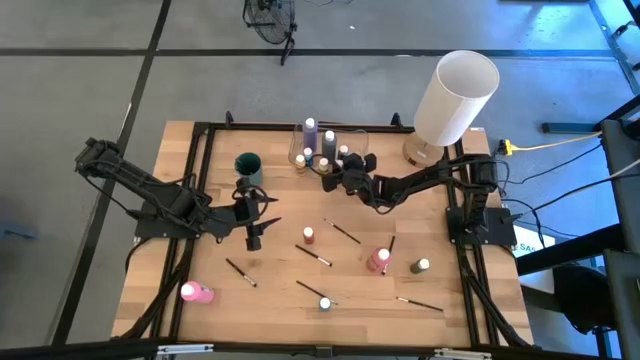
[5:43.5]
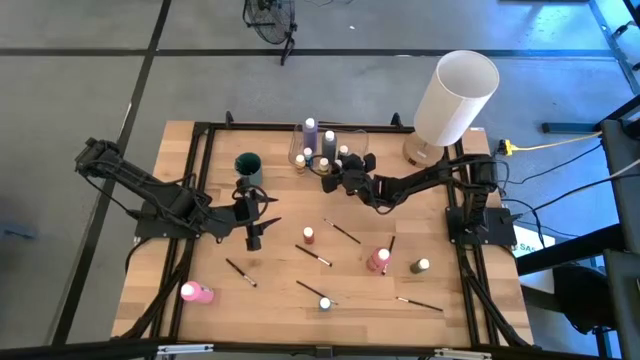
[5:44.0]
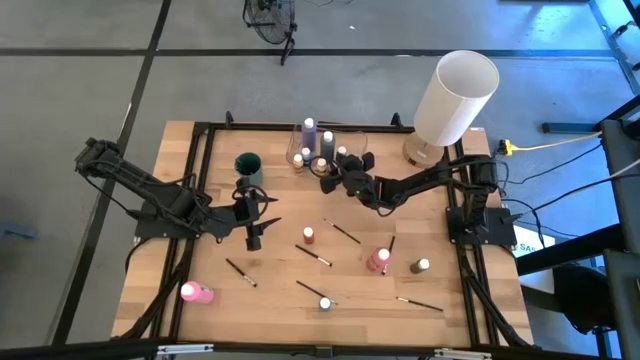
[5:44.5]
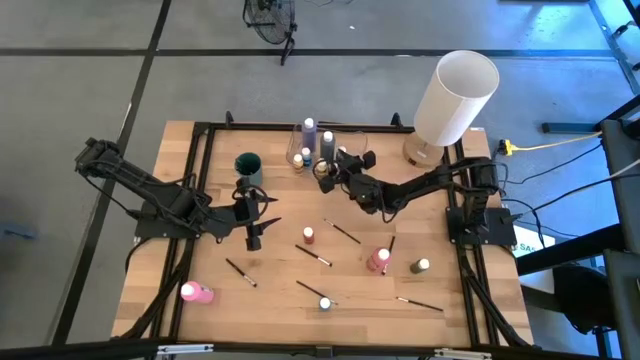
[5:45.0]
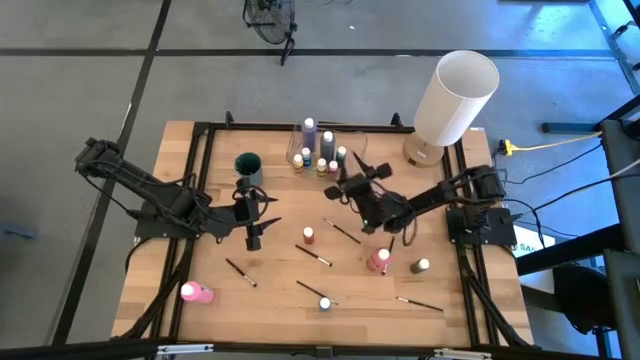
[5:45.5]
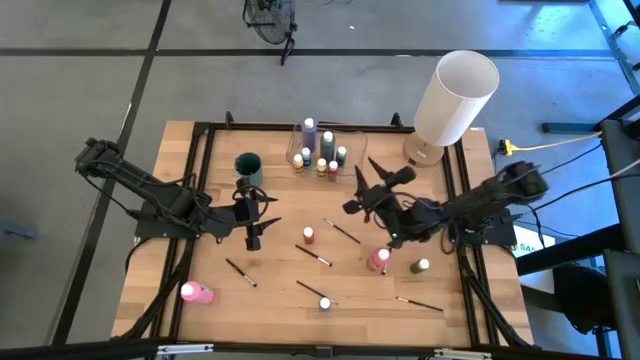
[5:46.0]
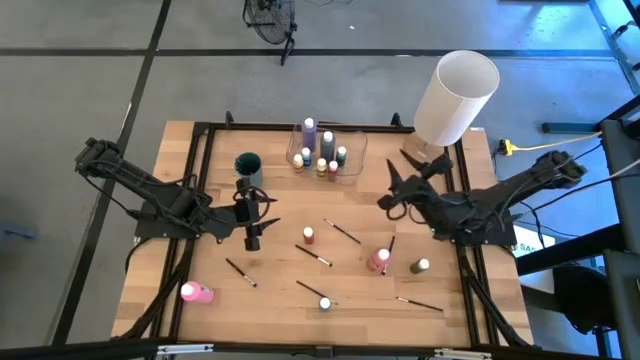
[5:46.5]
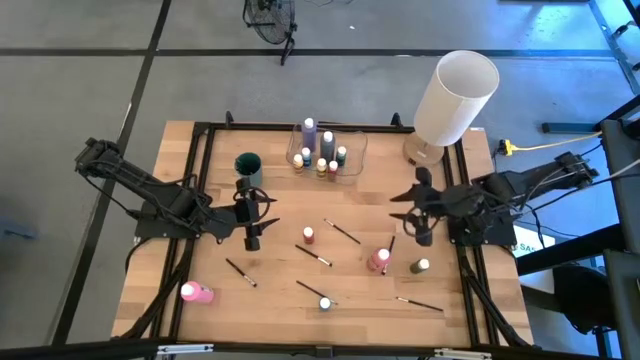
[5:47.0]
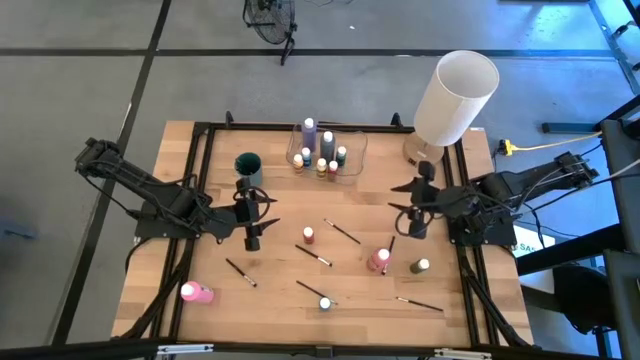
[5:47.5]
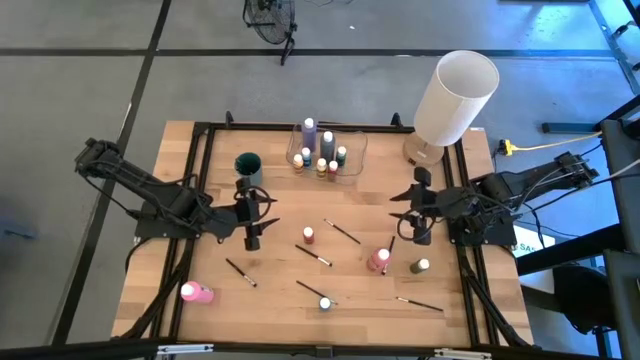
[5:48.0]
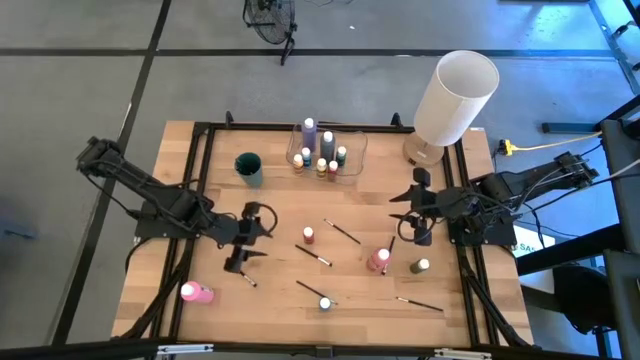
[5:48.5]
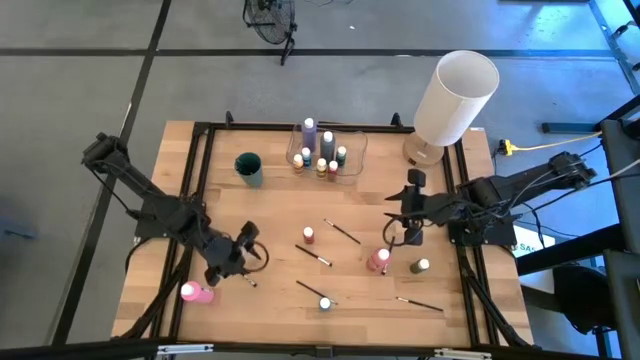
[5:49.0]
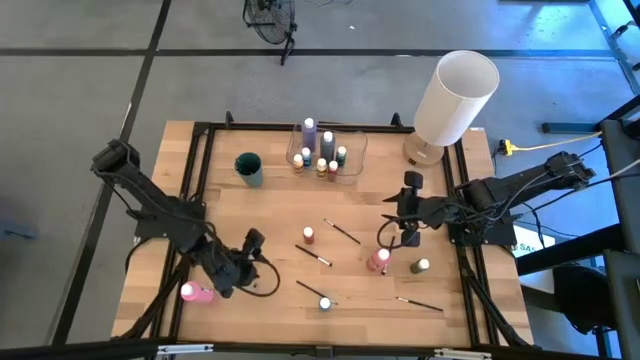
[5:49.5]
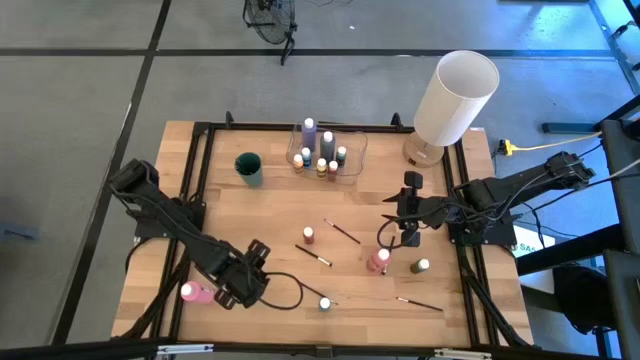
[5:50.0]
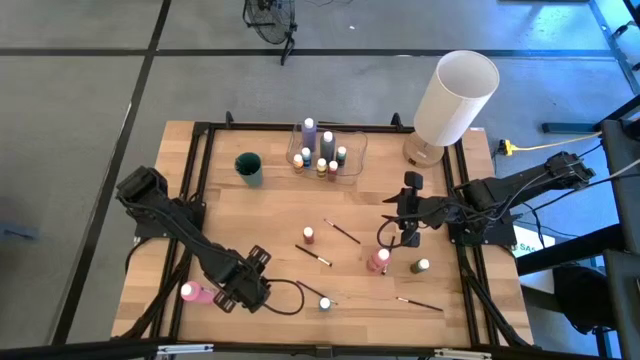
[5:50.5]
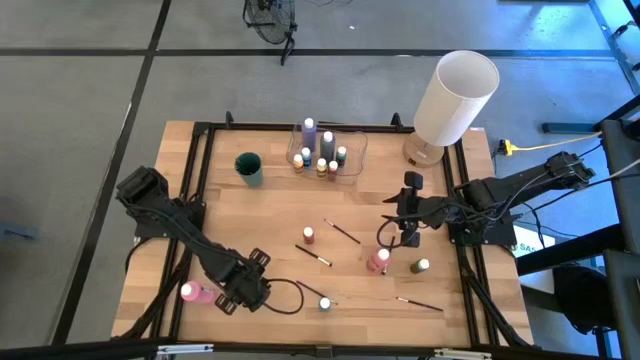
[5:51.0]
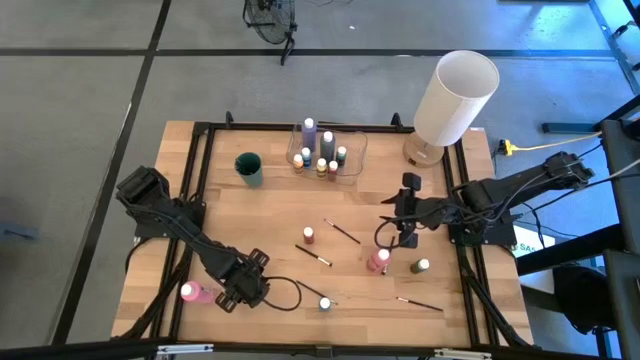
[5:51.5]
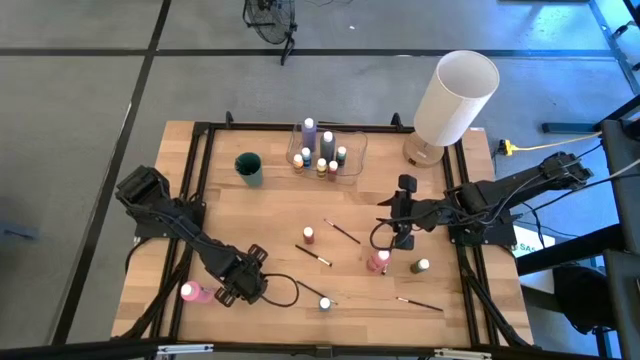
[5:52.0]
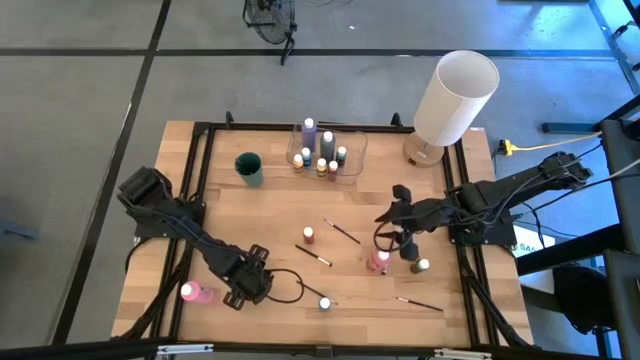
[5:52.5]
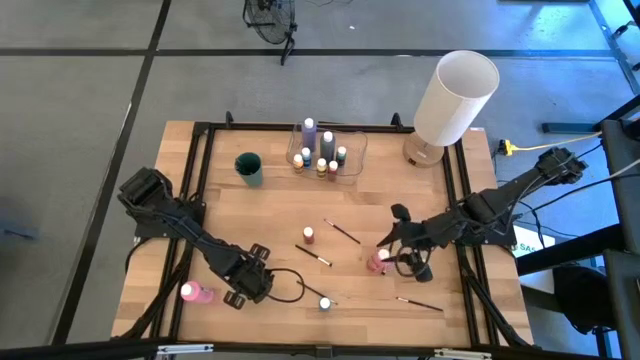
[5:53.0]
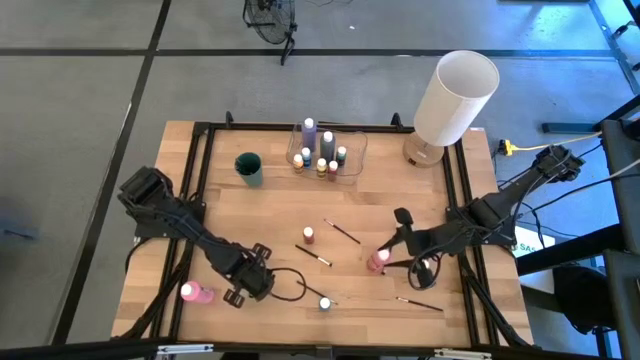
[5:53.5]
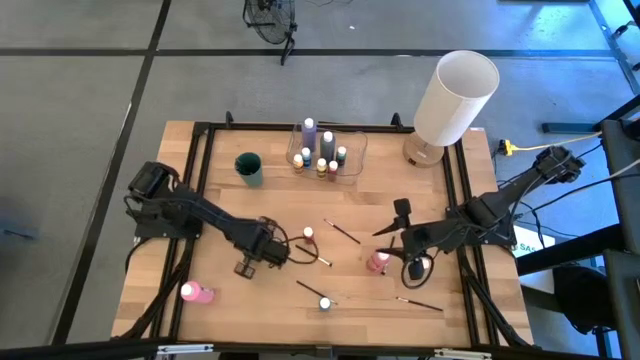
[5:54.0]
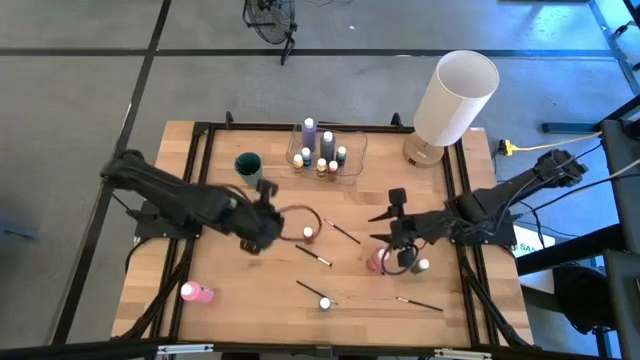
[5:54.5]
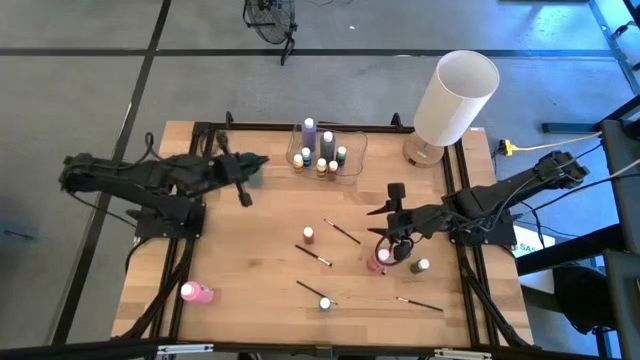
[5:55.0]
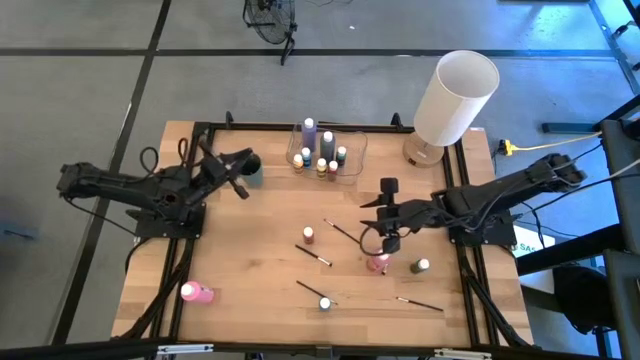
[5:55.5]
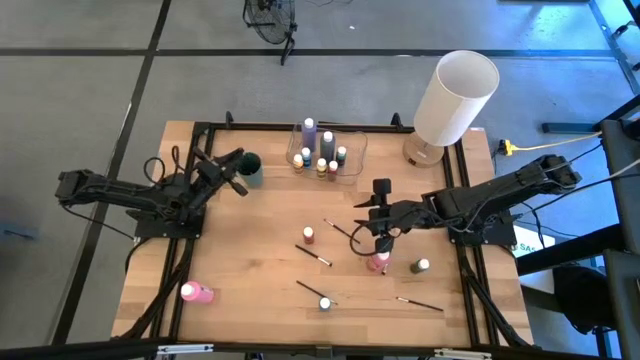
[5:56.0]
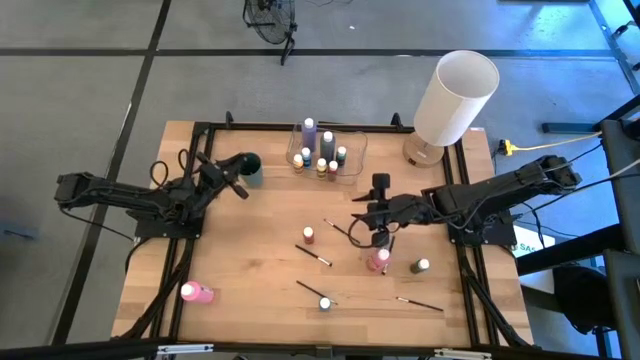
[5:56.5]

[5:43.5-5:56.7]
Task: Pick & Place Paint Supplies
Put the silver paint brush into the green cup

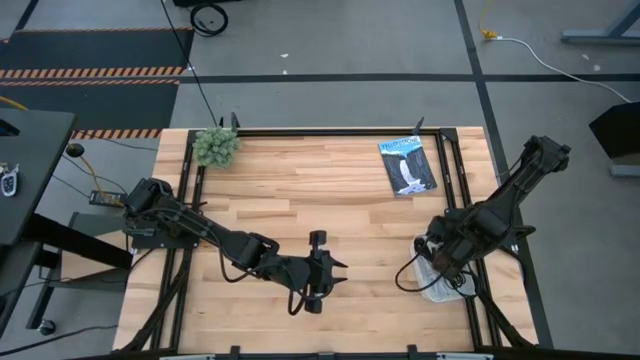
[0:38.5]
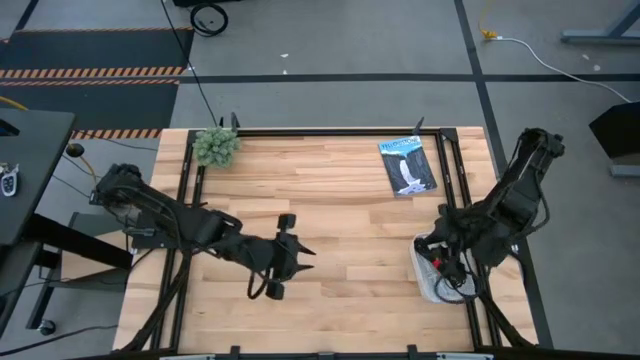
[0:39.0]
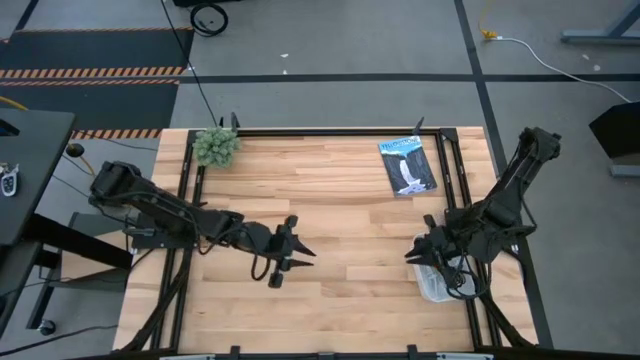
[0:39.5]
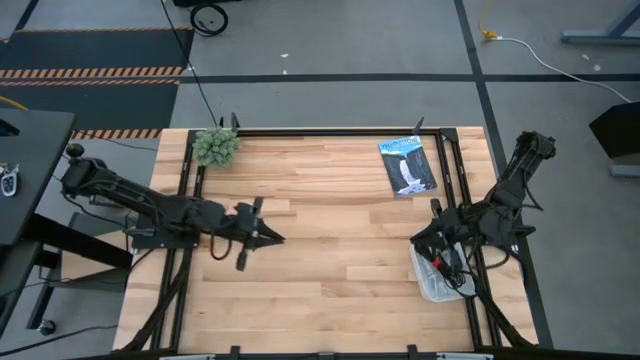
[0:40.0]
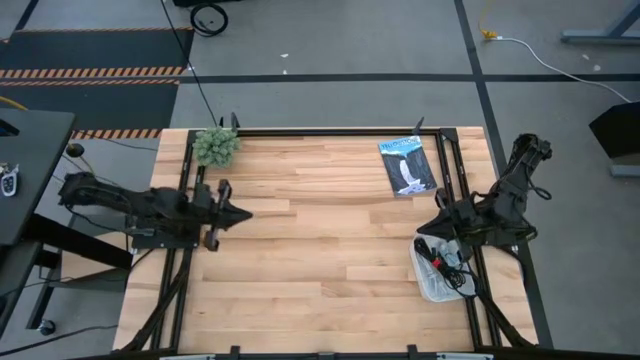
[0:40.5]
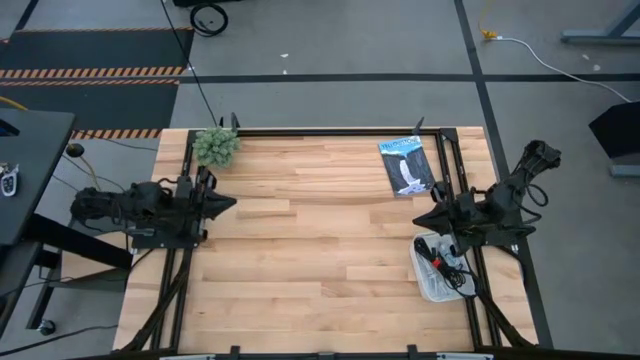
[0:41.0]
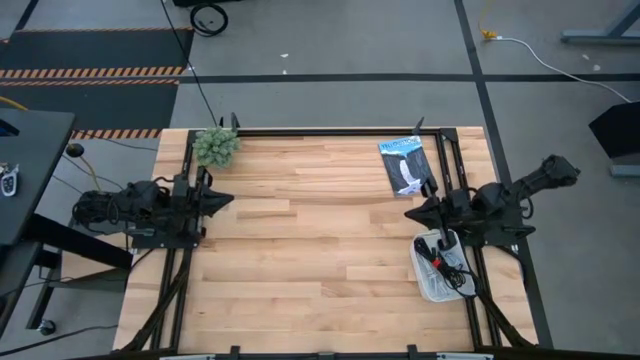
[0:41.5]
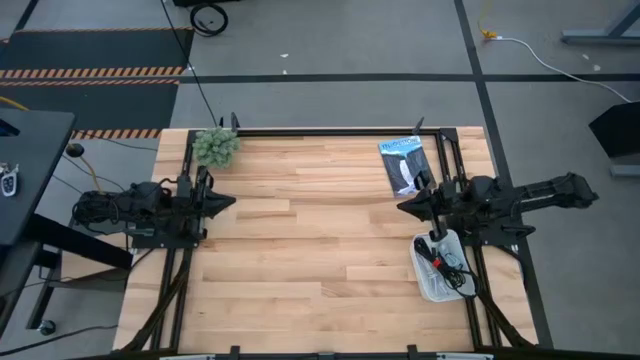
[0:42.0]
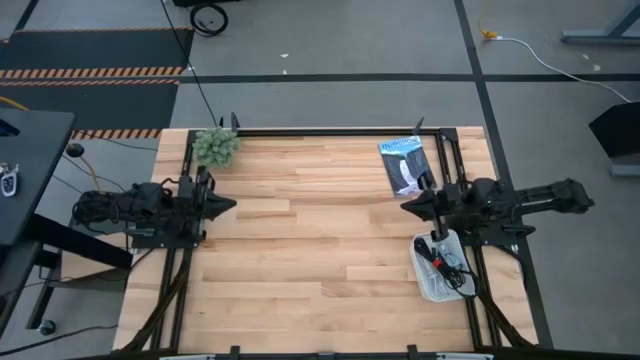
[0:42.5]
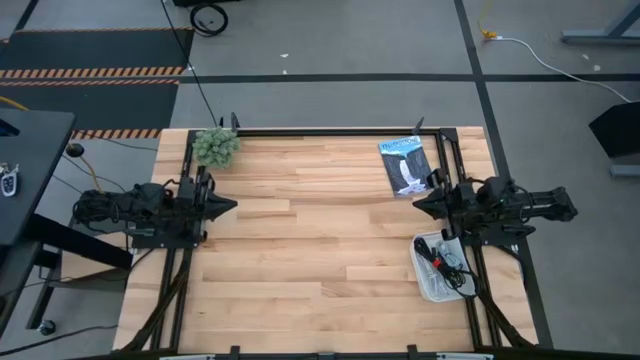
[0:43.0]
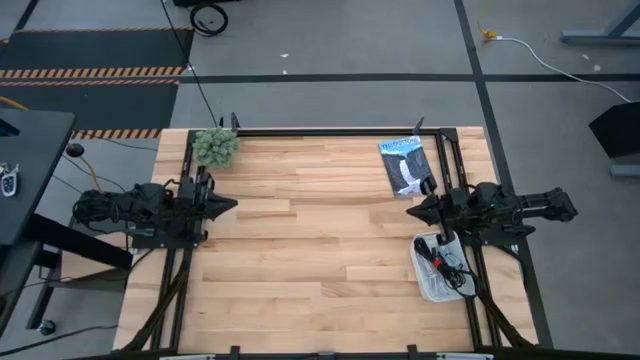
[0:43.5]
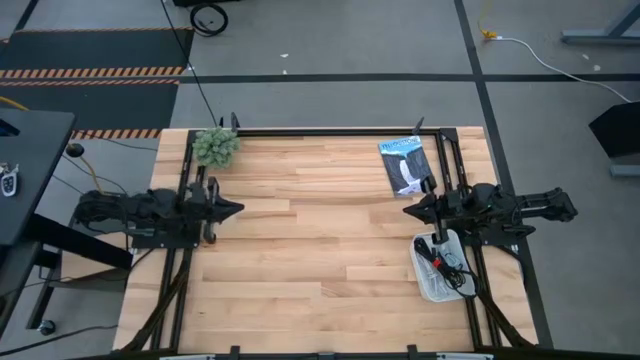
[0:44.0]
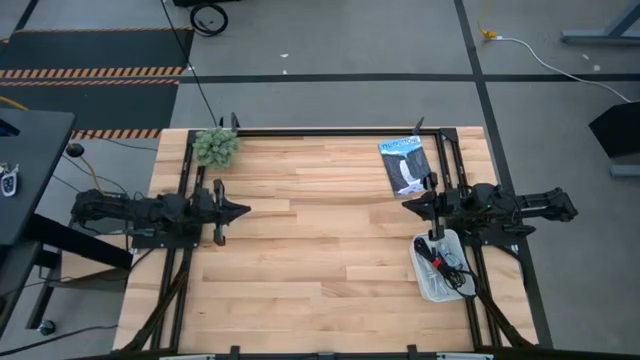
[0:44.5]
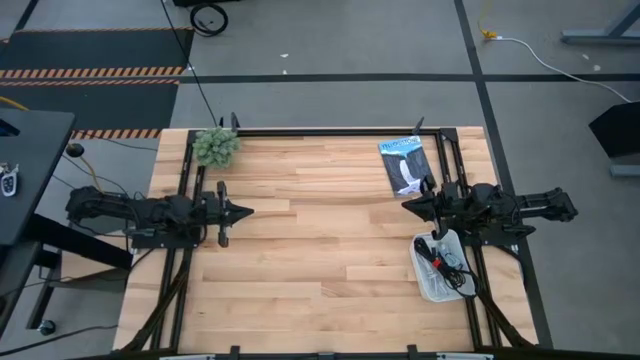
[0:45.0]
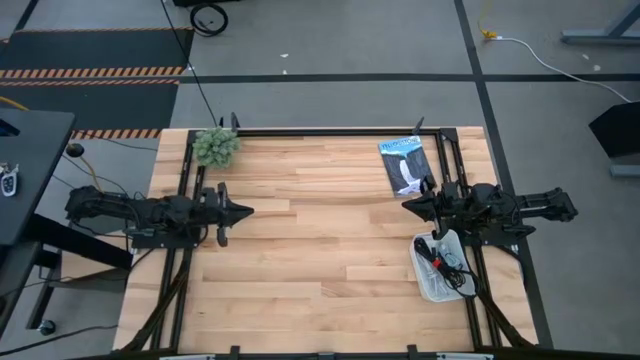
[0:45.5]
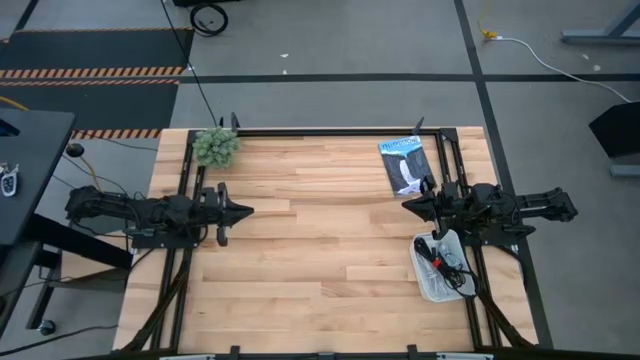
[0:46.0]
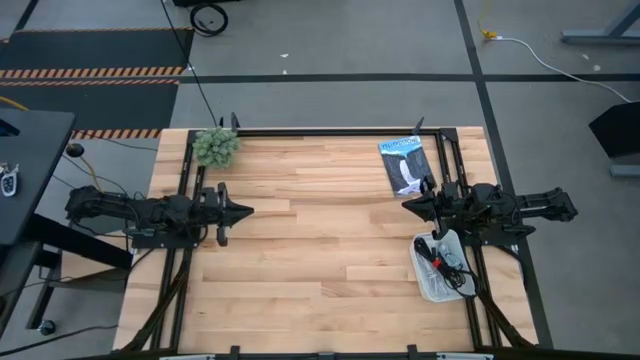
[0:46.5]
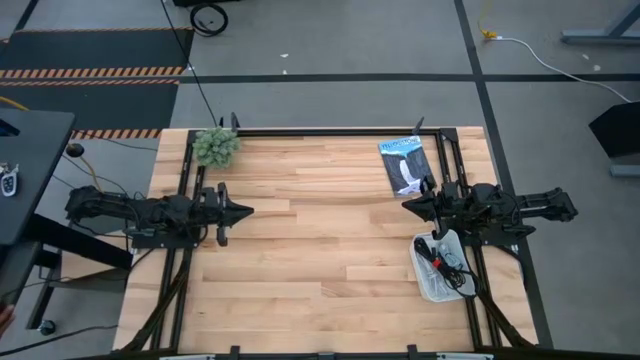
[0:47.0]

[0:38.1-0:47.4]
Task: Pick and place USB-C Cables
Return to Home Position
